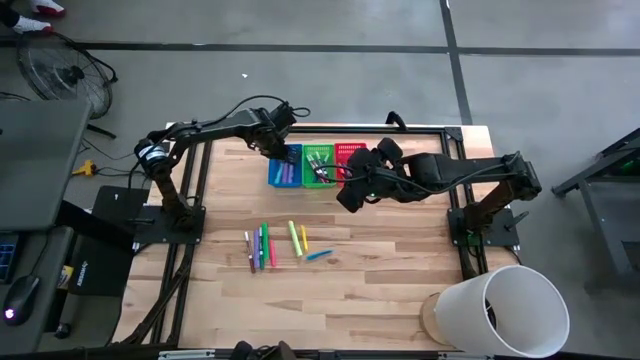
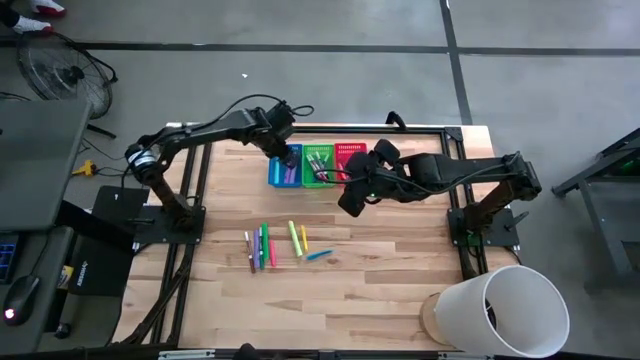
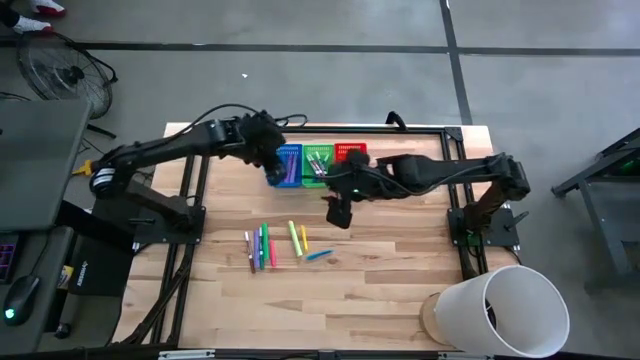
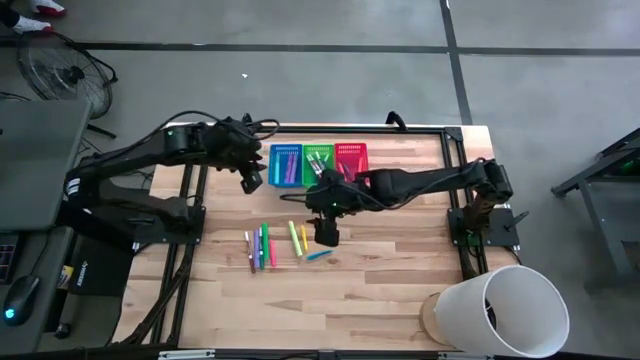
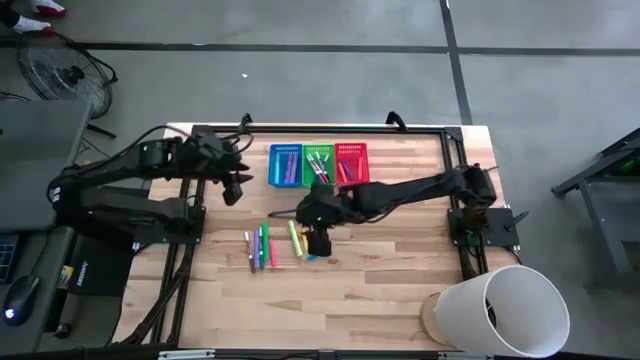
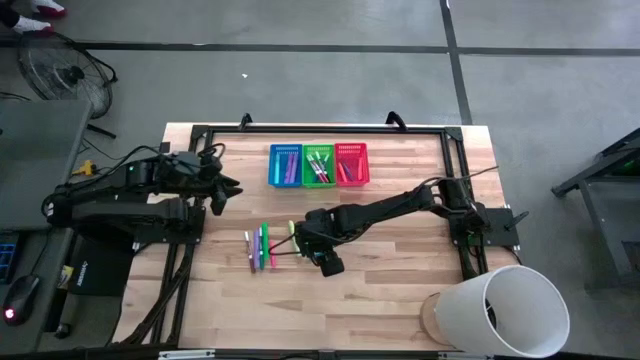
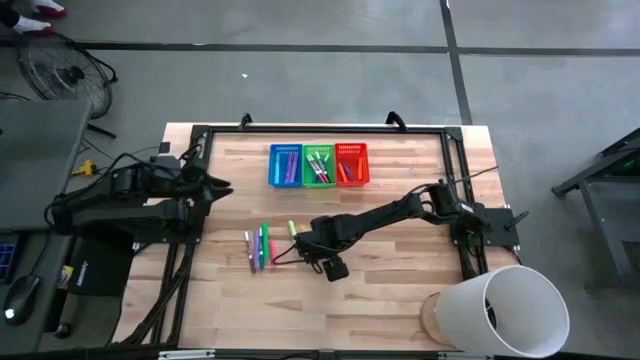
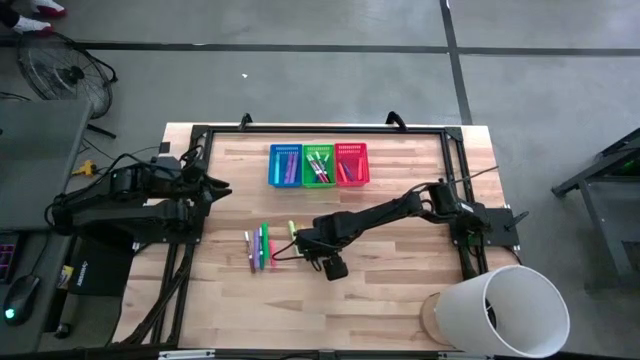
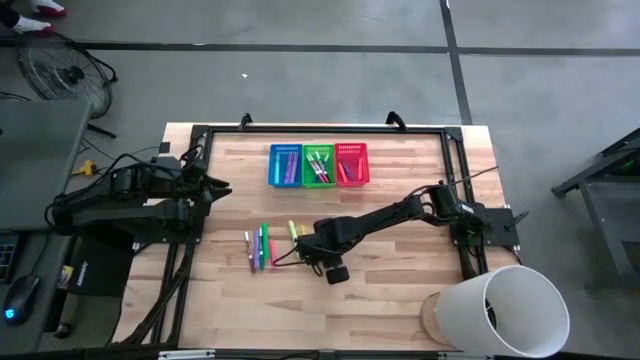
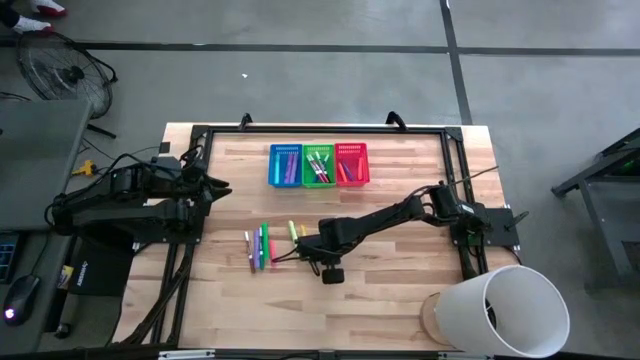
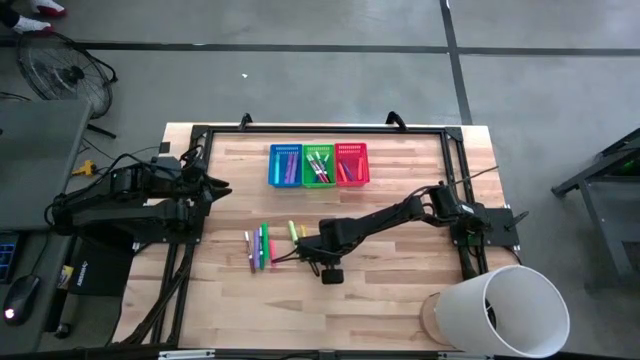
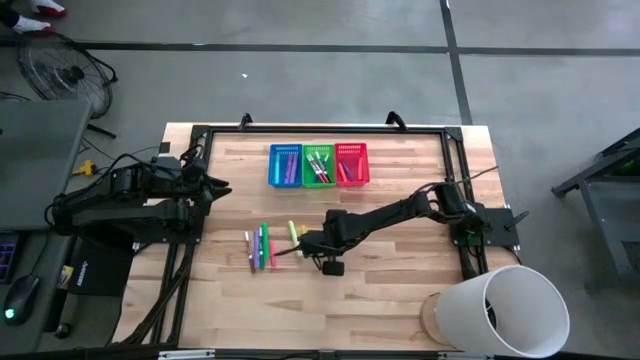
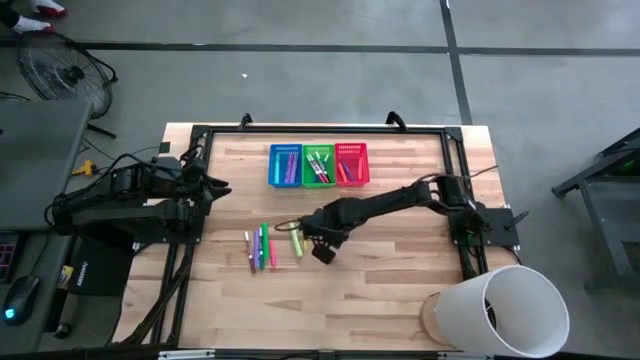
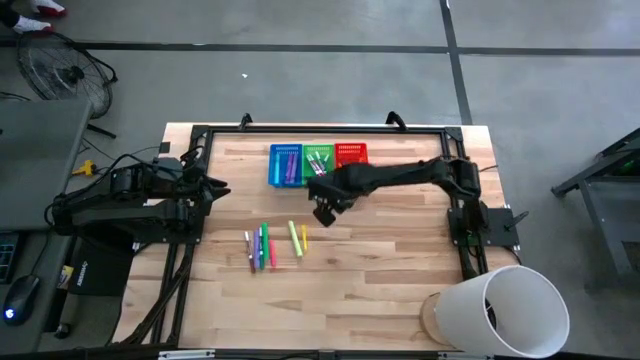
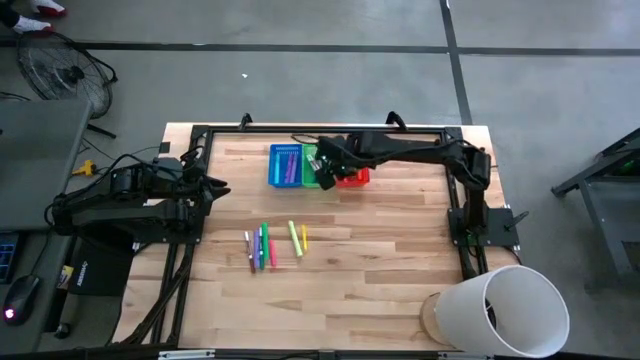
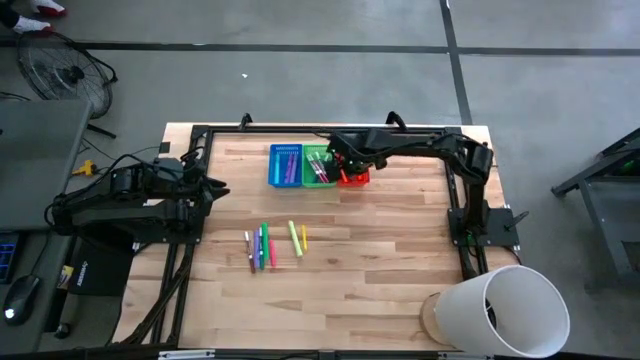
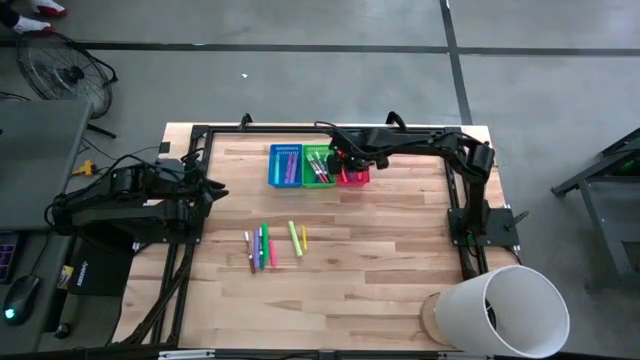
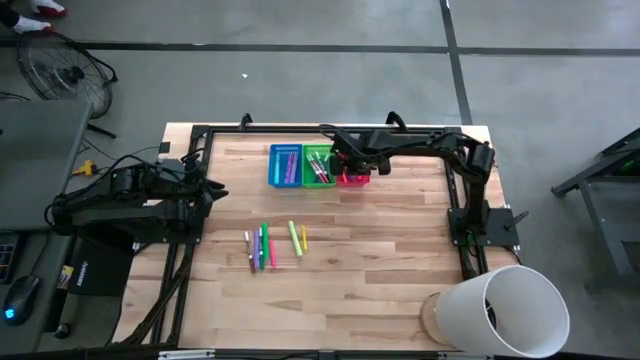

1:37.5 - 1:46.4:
Task: Pick & Place Markers
Put the blue highlighter into the red bin

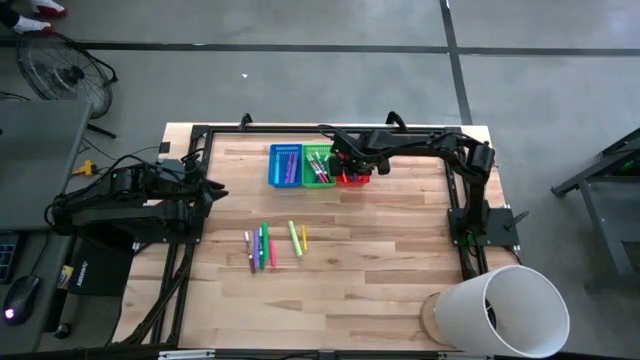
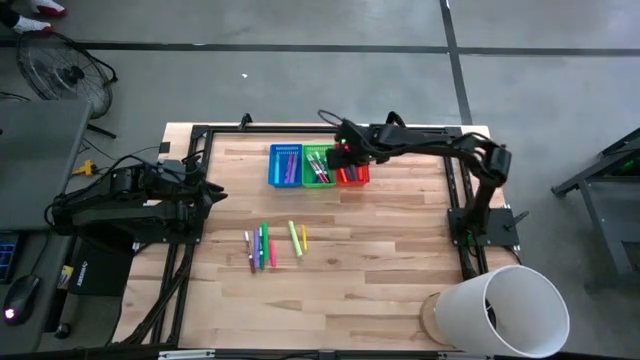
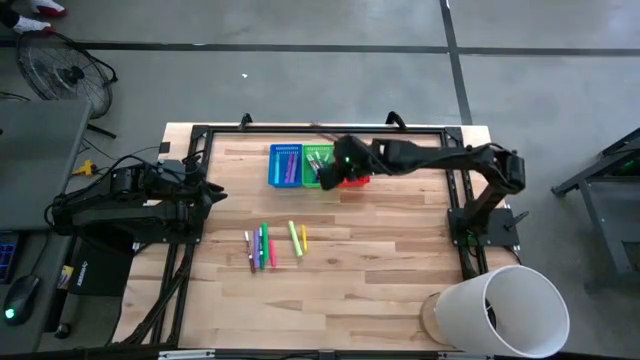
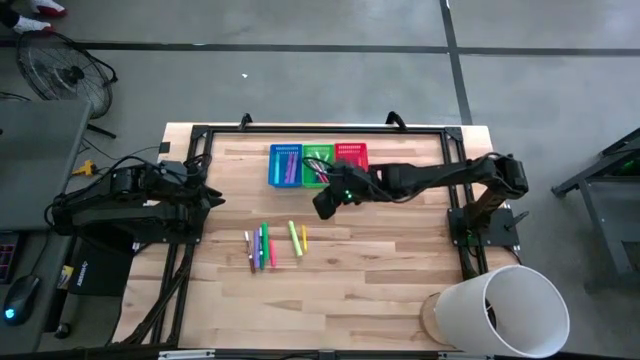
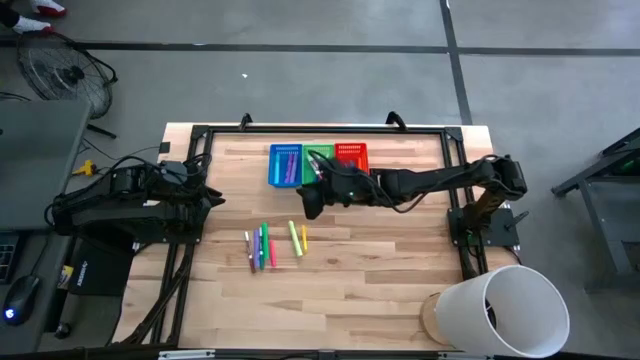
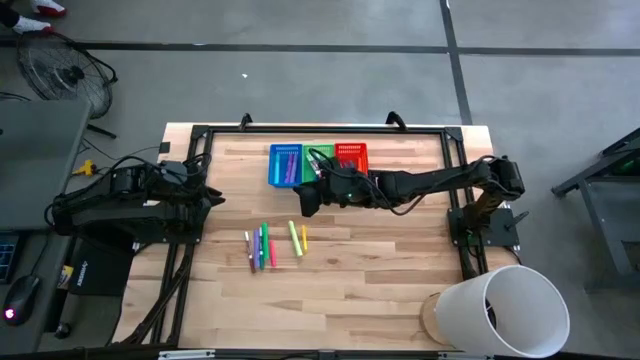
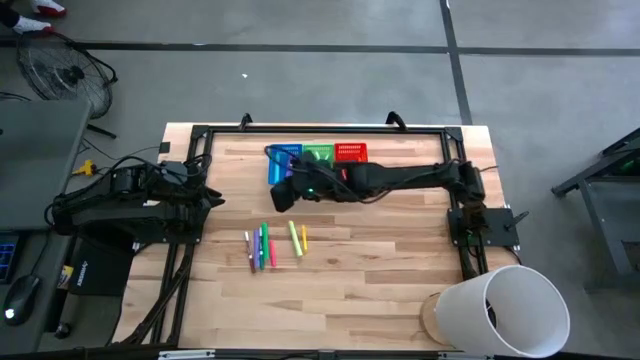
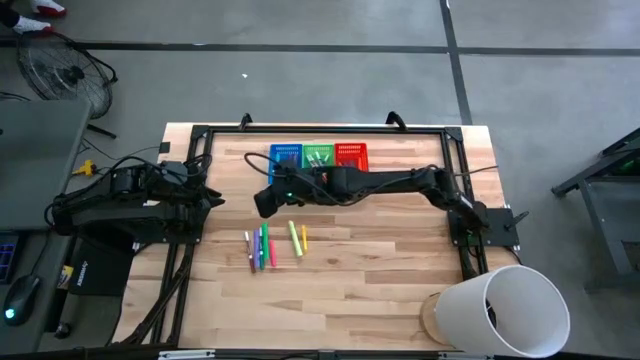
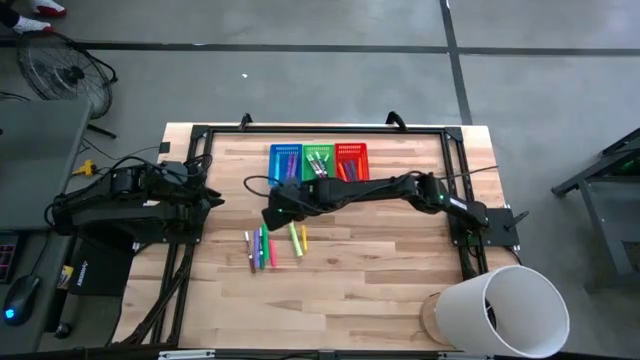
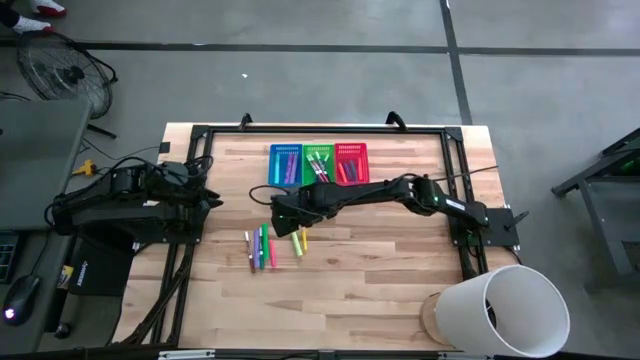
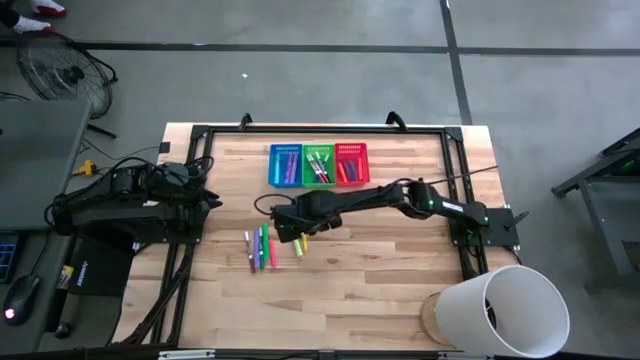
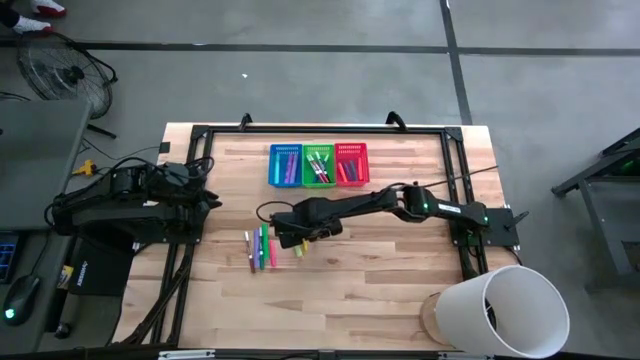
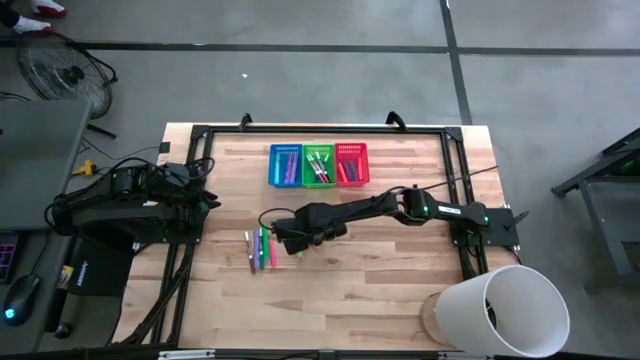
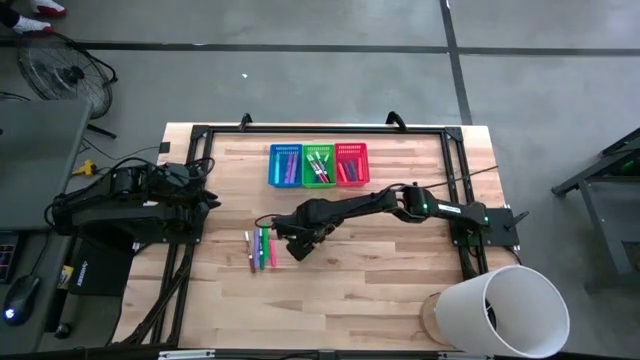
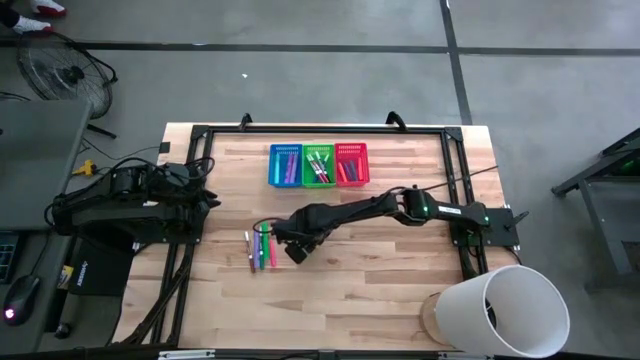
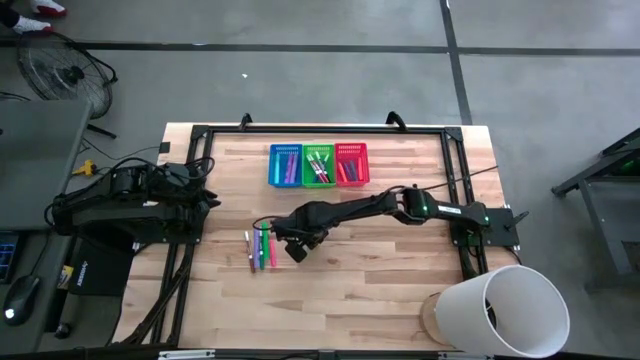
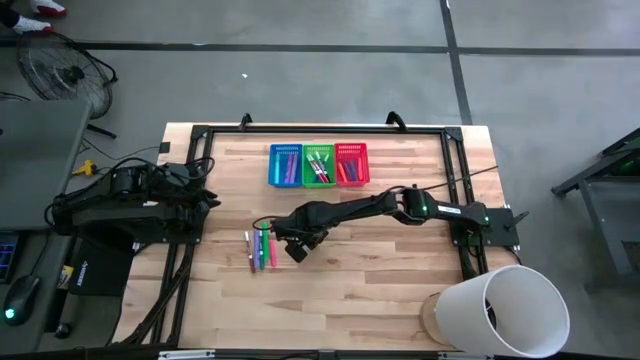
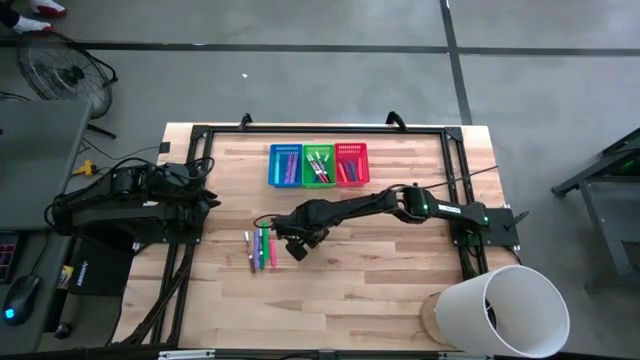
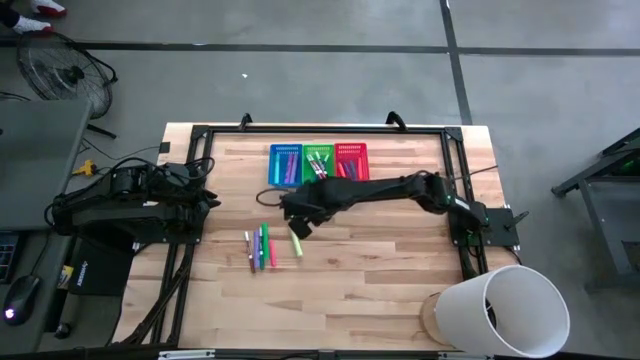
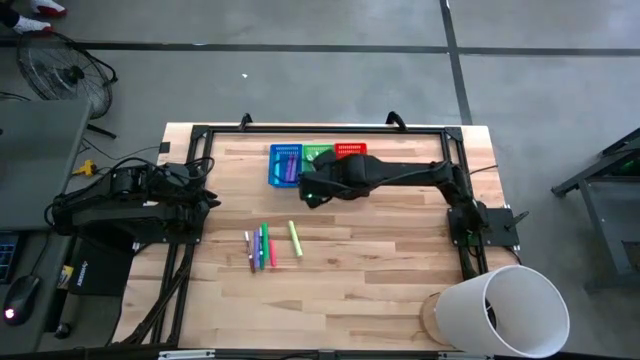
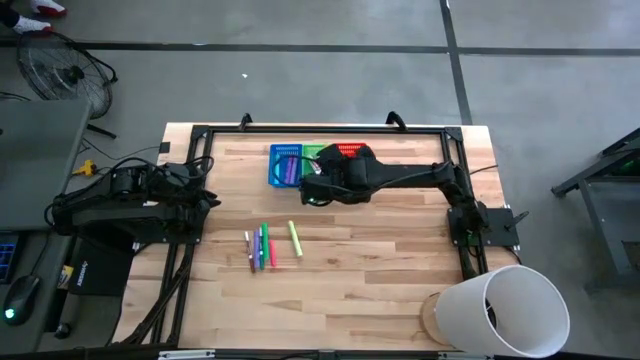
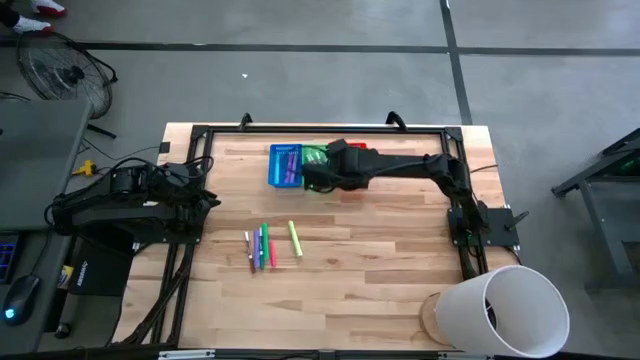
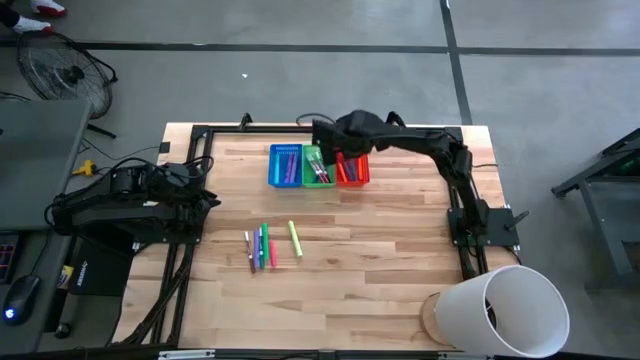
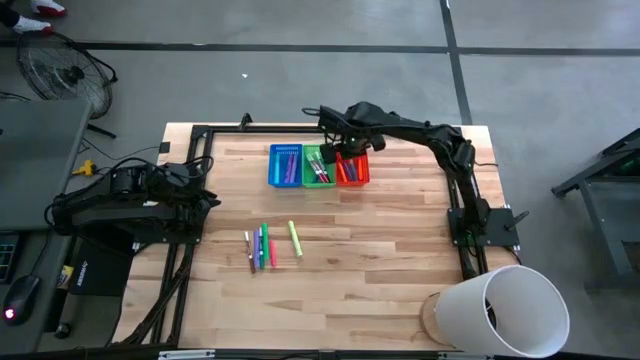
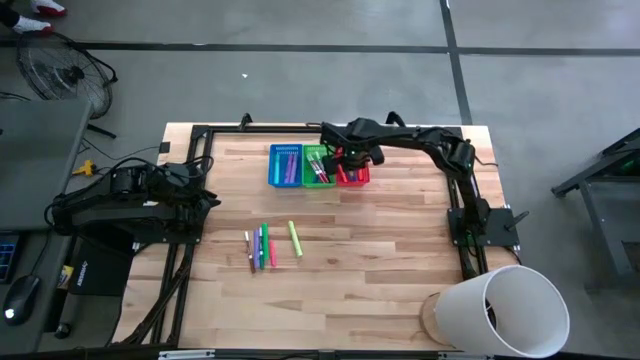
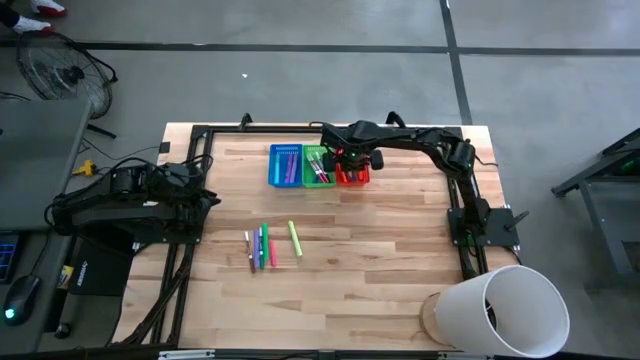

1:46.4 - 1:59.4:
Put the yellow highlighter into the red bin
